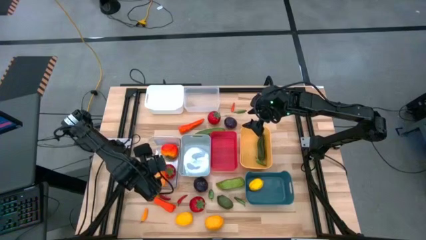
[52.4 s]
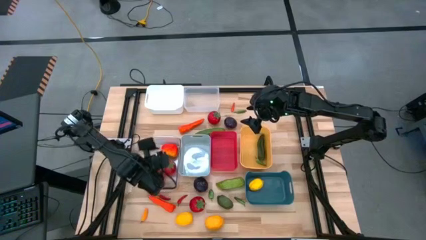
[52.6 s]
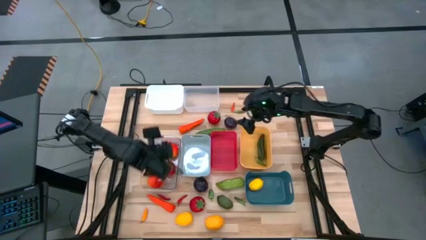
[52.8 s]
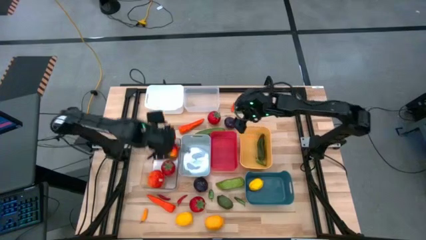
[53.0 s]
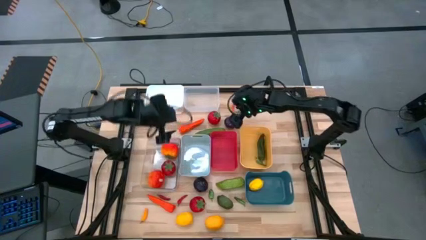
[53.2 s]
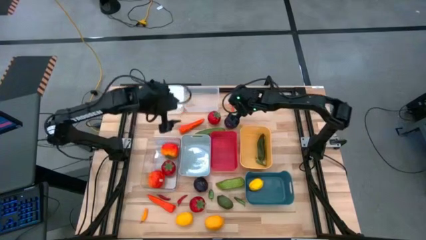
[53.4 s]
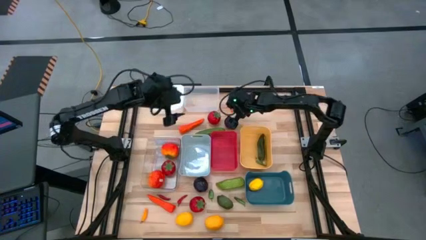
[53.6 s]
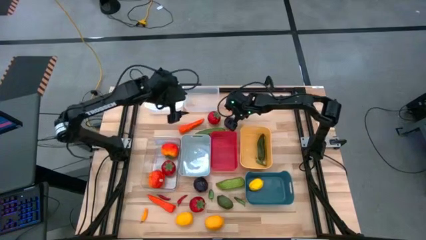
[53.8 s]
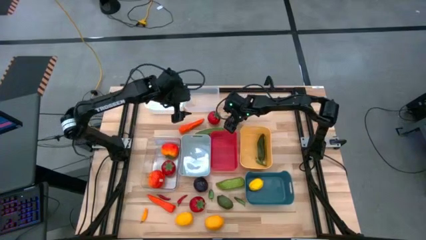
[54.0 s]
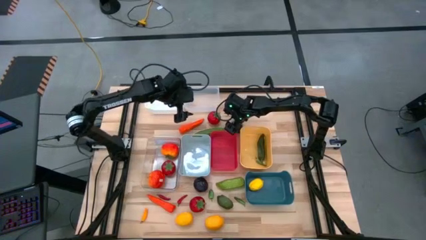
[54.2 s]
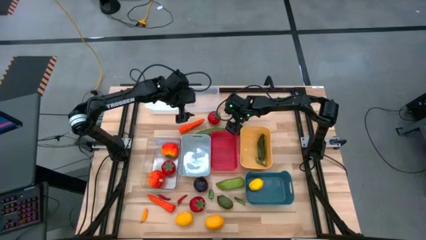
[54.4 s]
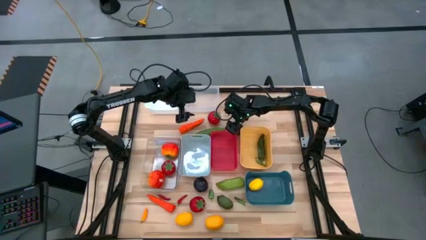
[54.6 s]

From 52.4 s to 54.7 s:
Task: Sort produce into baskets
Put the plum into the red bin

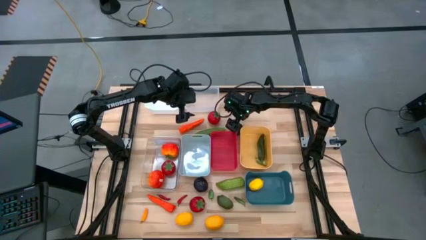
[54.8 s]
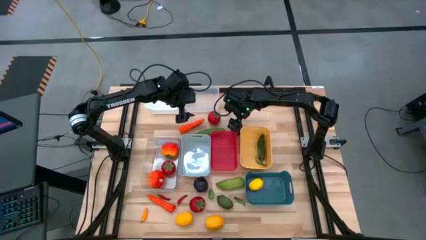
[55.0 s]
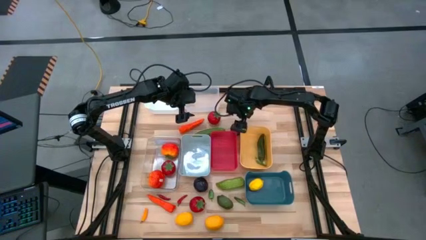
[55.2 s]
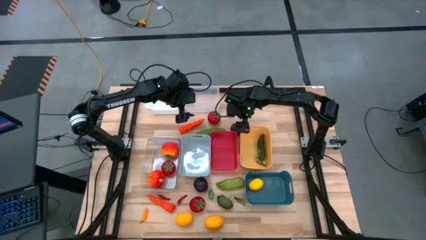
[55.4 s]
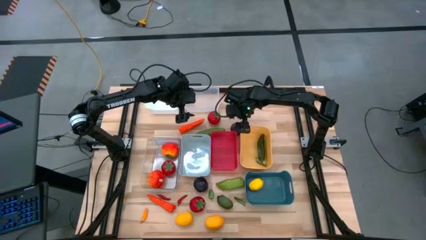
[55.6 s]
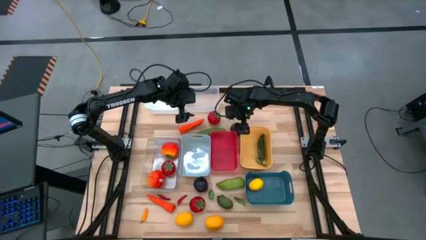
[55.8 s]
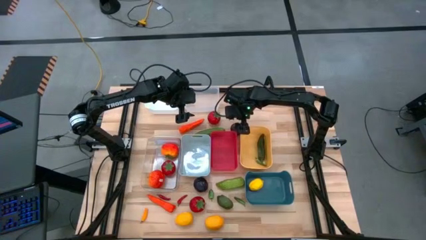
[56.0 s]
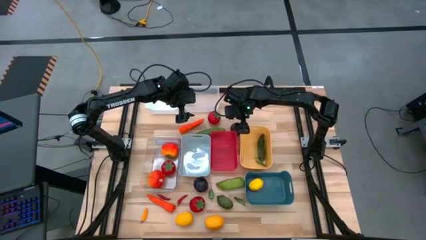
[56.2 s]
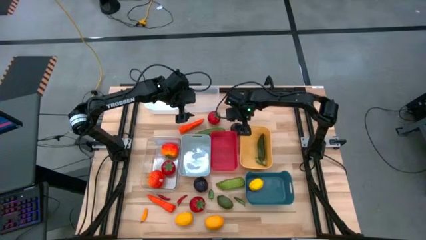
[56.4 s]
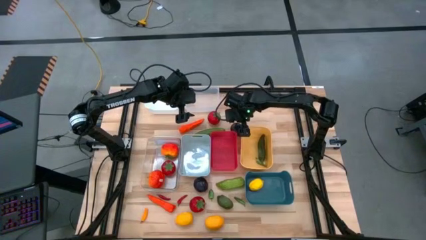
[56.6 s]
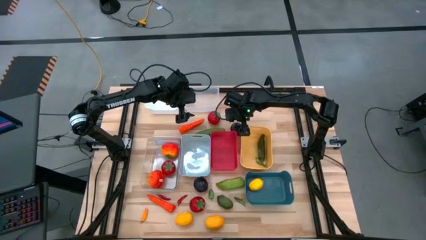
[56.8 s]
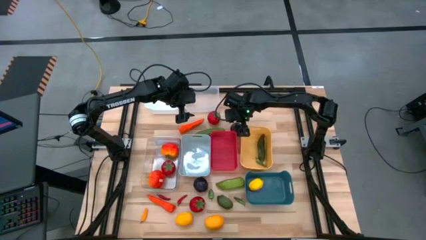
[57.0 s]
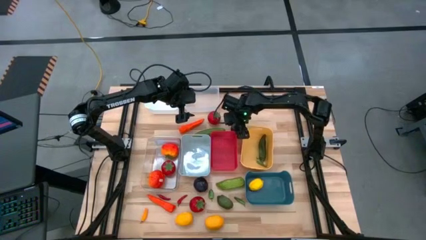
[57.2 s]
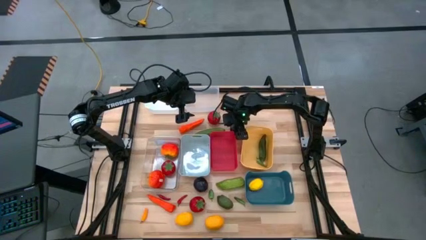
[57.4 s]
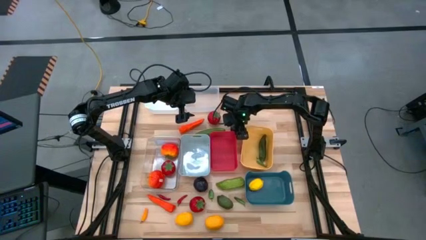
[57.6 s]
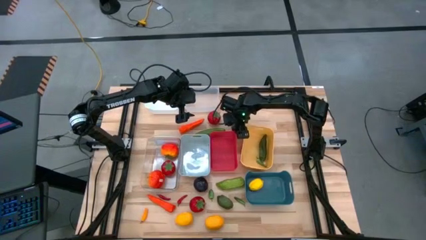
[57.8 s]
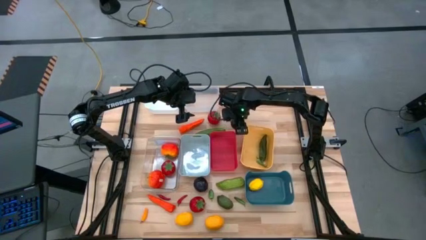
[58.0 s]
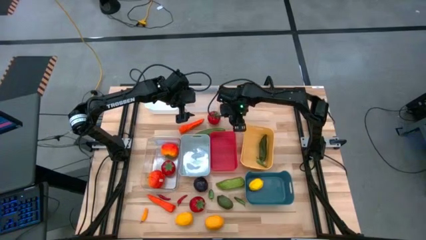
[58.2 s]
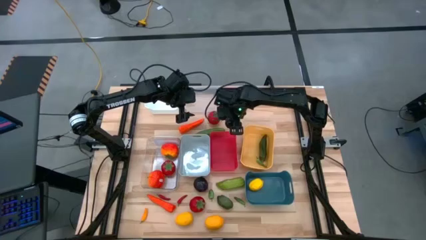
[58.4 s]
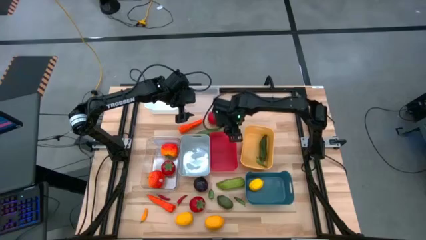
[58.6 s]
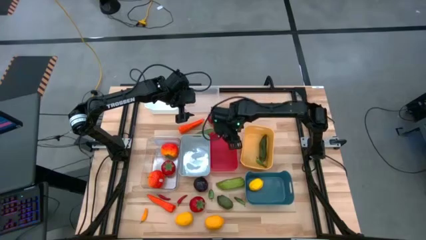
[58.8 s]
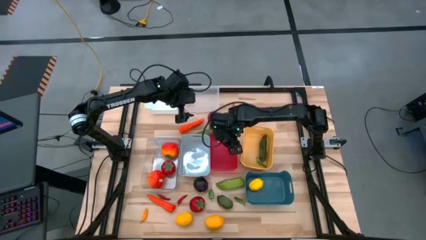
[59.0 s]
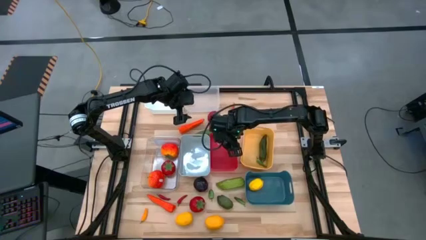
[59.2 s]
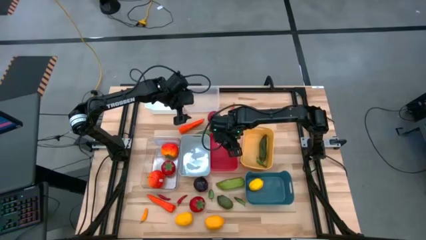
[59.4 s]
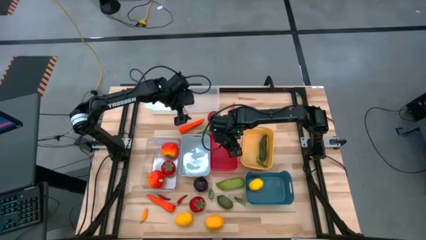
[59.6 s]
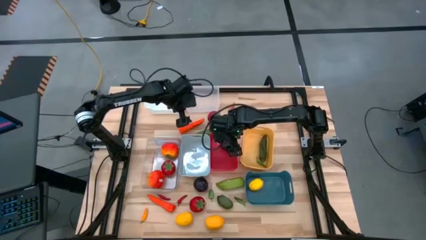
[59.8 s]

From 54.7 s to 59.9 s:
Put the plum into the red bin

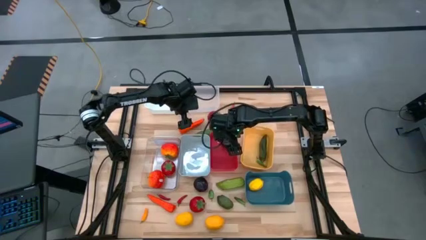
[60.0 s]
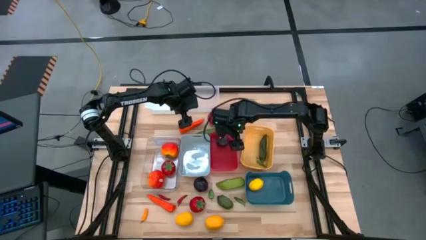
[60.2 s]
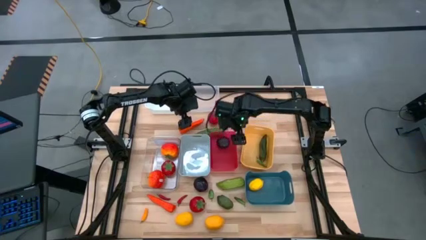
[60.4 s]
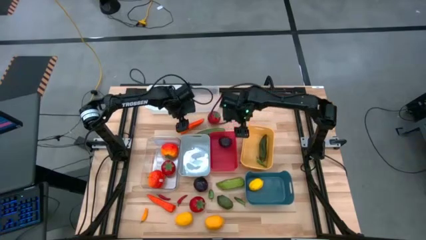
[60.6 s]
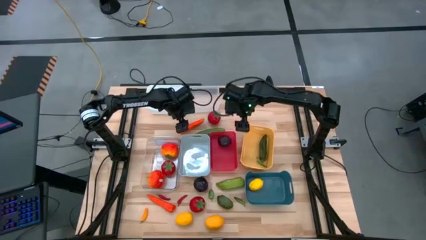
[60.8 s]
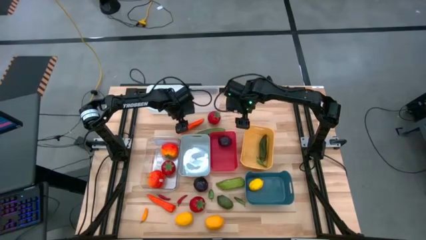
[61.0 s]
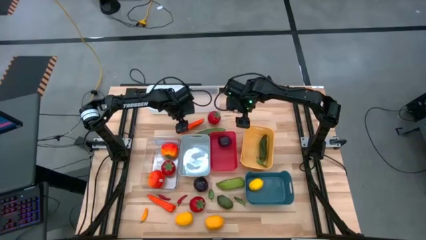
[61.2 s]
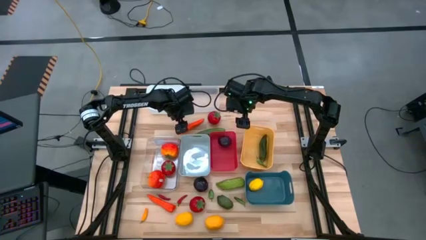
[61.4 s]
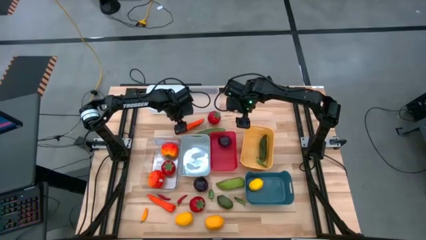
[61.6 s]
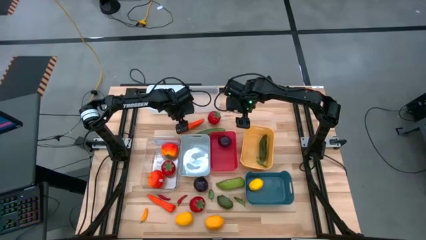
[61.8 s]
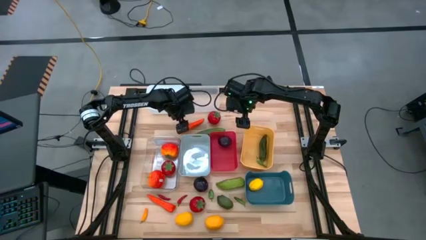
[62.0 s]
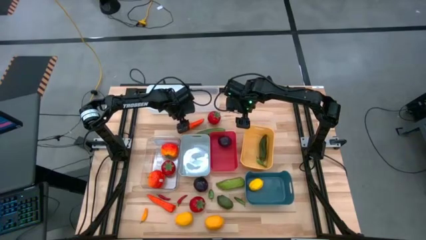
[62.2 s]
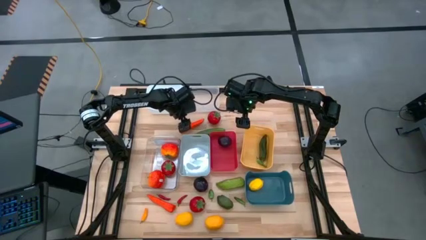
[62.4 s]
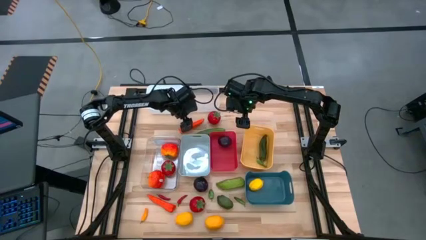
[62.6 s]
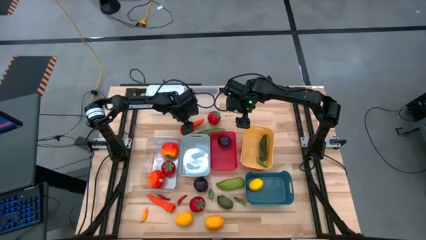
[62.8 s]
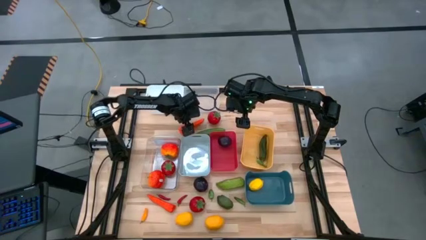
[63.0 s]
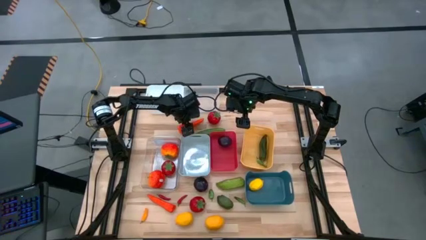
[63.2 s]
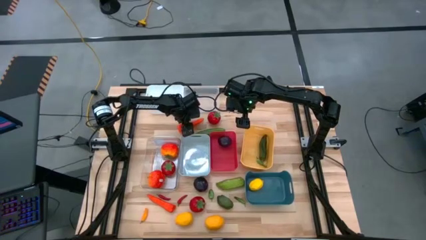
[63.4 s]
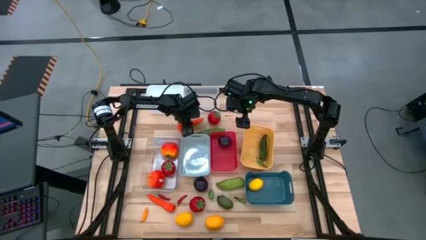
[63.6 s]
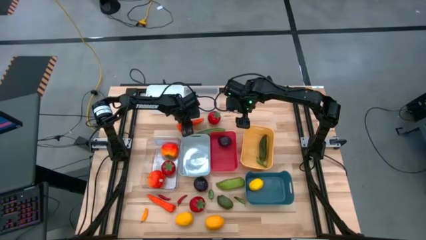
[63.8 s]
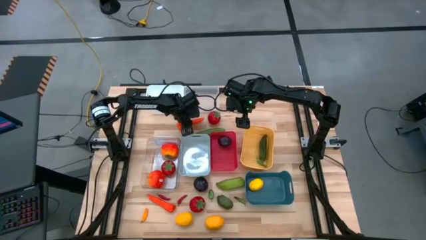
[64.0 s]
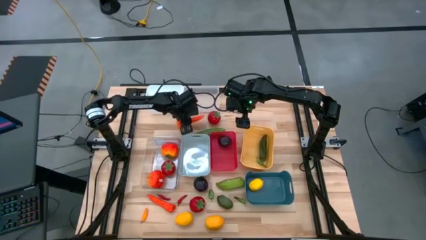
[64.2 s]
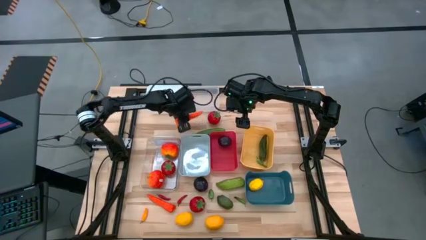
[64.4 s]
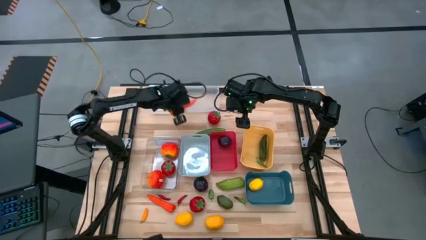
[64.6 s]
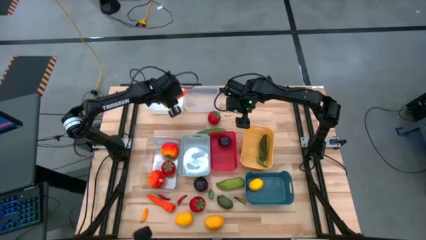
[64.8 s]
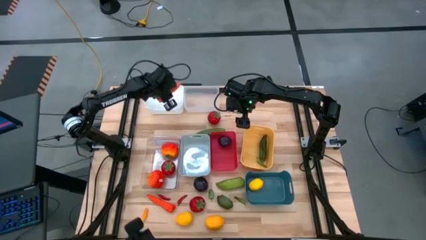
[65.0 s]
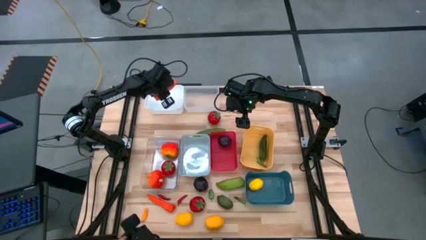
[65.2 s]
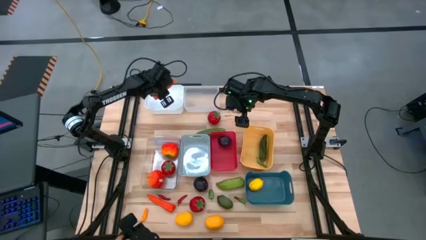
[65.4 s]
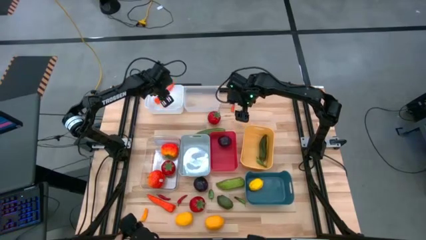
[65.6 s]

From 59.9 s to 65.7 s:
Put the carrot into the white bin

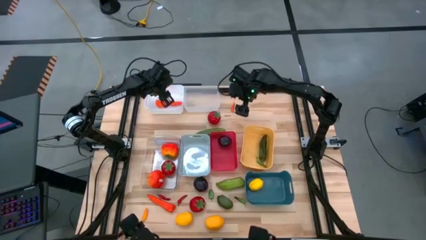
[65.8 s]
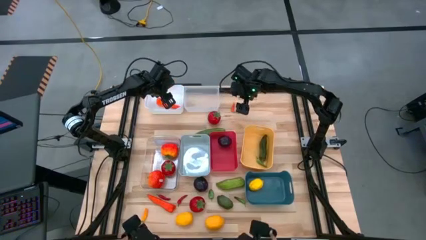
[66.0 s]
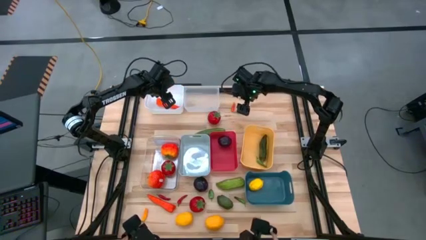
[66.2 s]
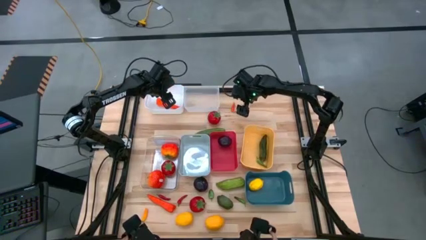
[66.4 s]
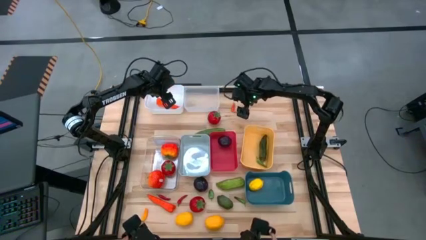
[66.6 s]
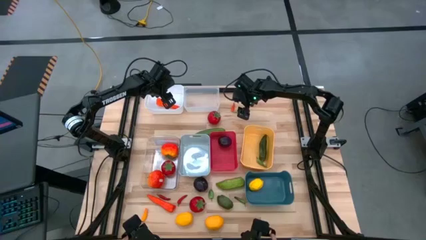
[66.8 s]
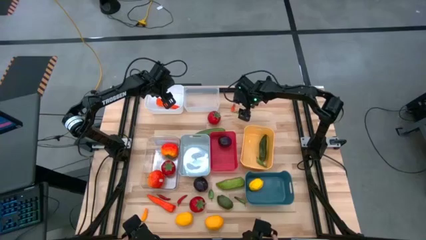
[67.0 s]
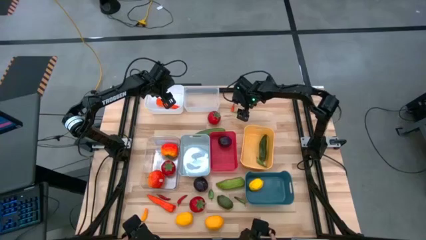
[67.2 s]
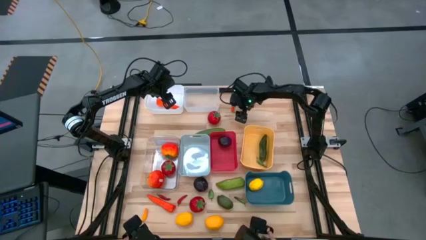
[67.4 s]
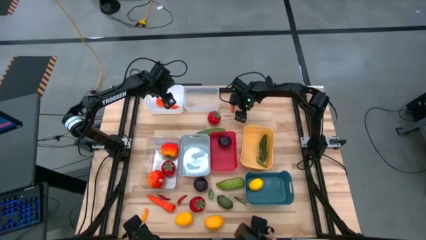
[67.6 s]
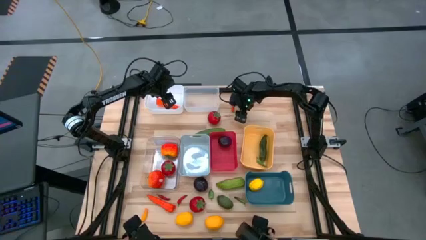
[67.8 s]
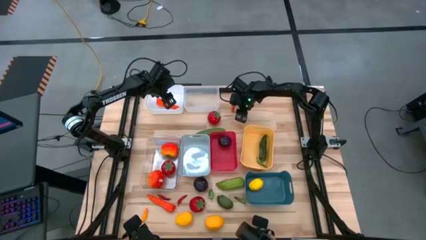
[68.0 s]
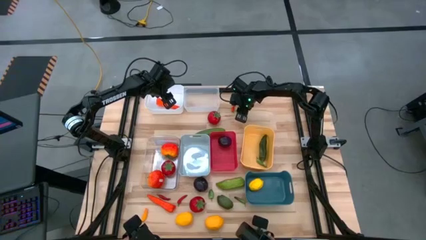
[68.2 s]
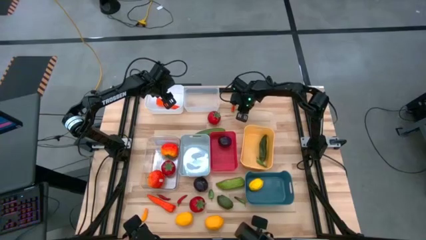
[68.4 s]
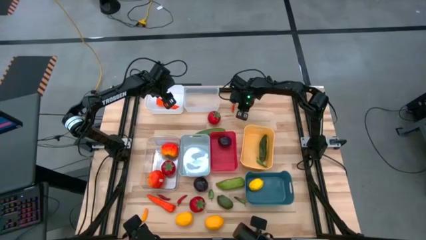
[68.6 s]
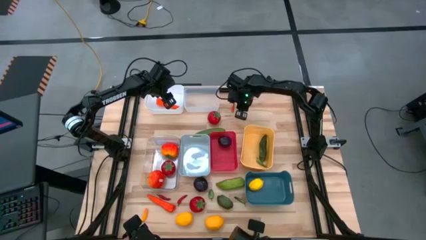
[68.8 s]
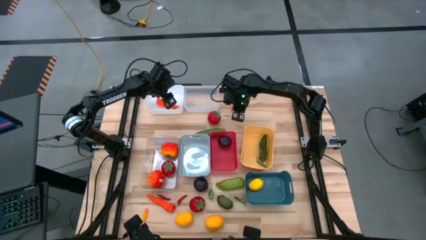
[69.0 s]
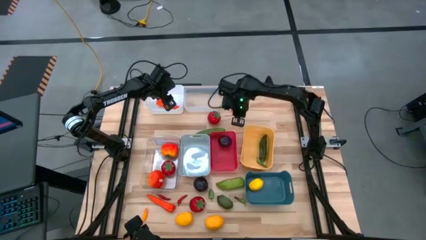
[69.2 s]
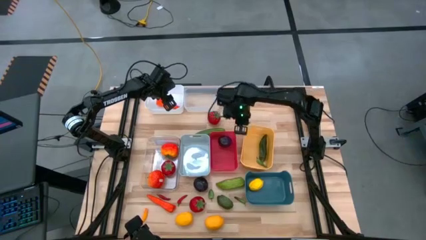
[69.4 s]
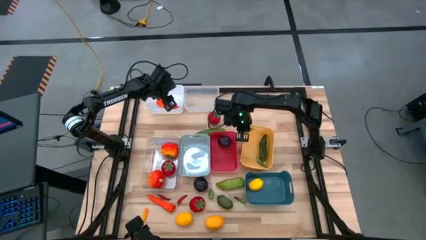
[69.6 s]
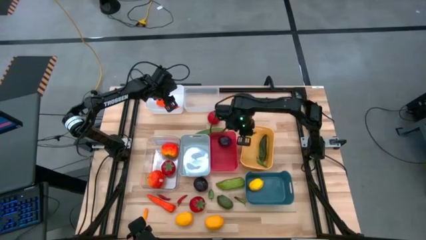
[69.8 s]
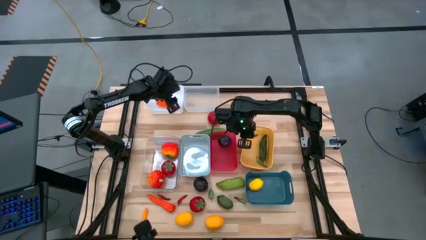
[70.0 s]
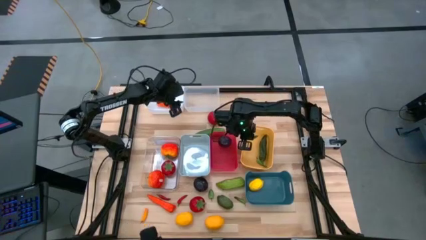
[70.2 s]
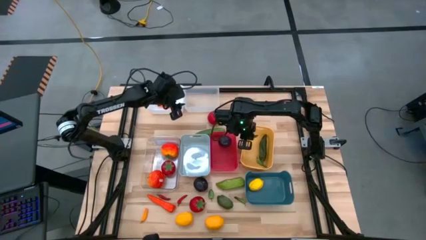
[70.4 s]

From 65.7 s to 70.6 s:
Put the green chili pepper into the yellow bin
